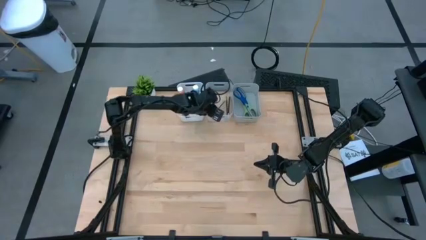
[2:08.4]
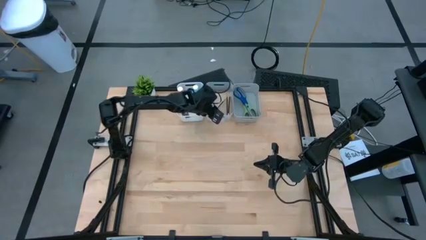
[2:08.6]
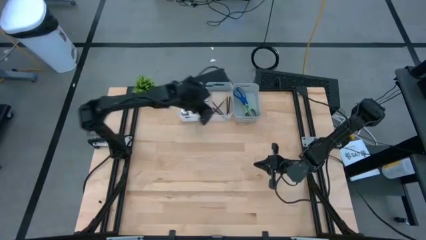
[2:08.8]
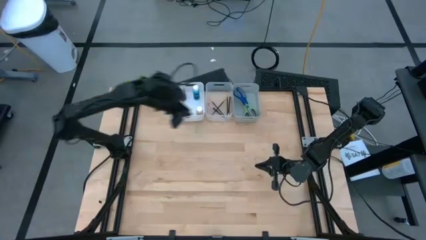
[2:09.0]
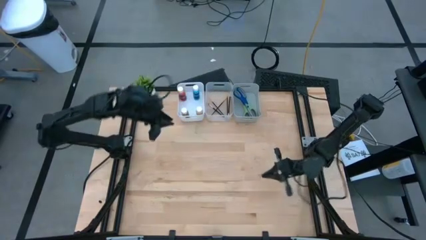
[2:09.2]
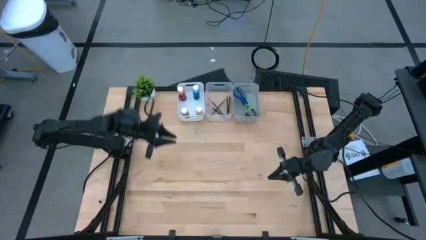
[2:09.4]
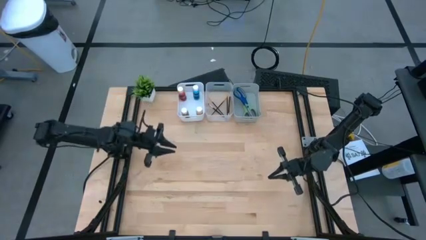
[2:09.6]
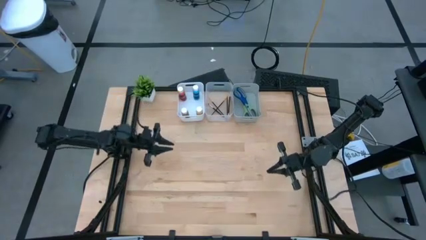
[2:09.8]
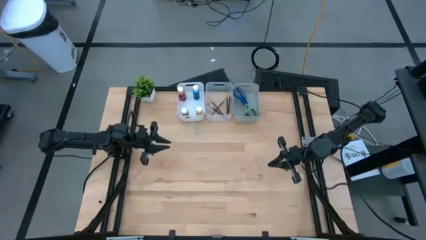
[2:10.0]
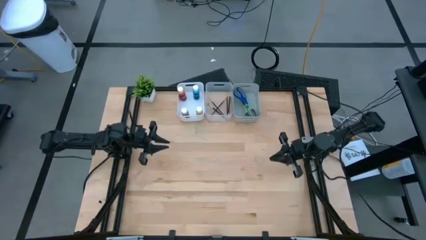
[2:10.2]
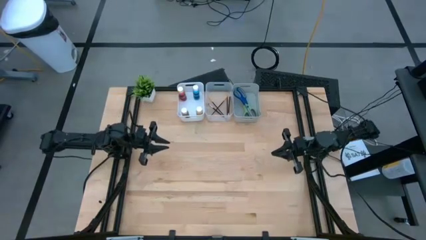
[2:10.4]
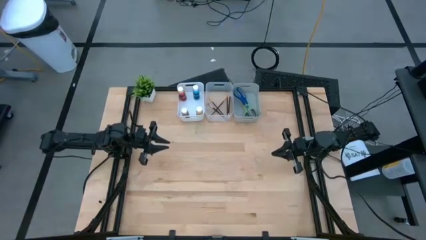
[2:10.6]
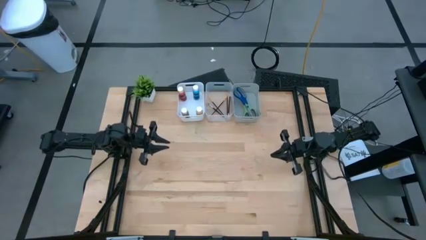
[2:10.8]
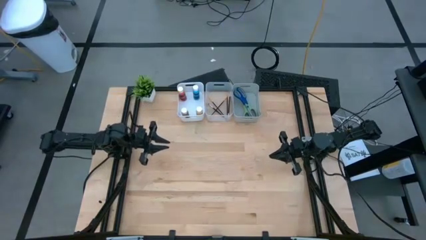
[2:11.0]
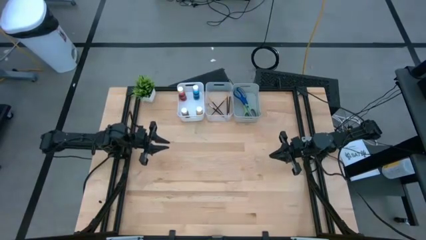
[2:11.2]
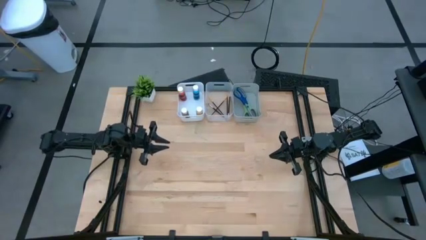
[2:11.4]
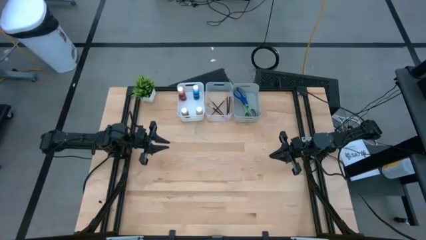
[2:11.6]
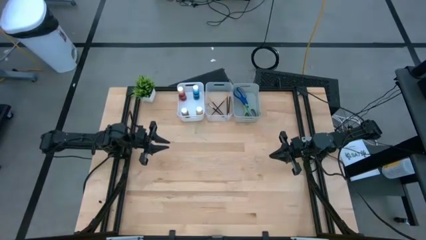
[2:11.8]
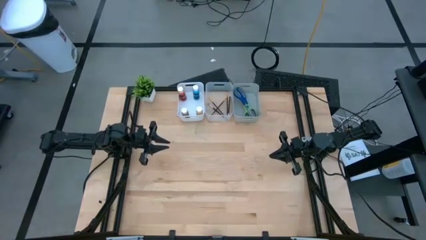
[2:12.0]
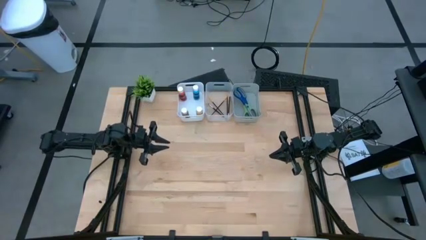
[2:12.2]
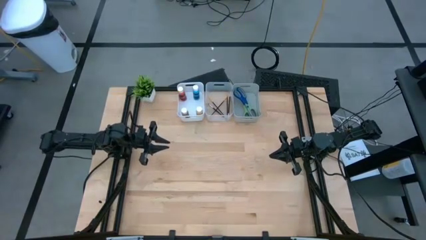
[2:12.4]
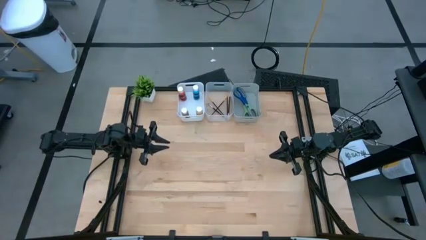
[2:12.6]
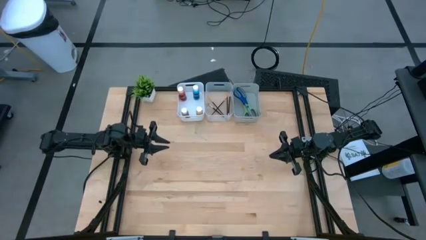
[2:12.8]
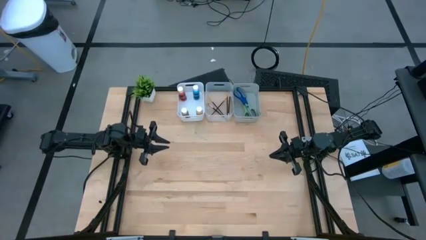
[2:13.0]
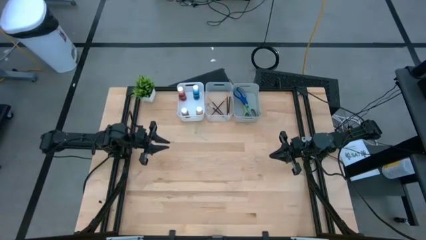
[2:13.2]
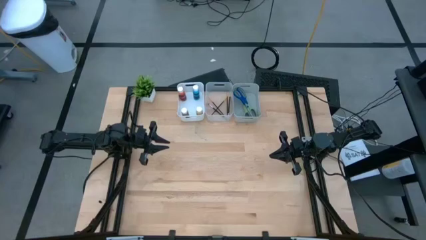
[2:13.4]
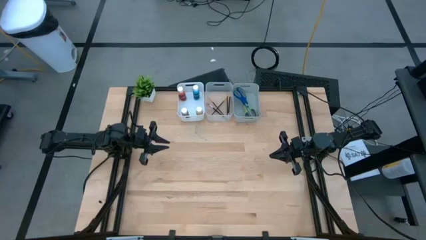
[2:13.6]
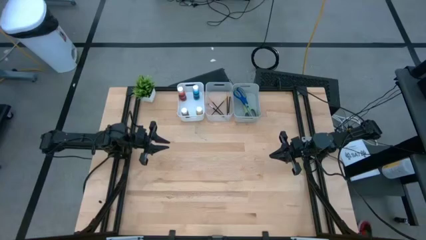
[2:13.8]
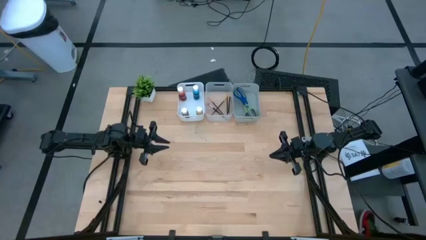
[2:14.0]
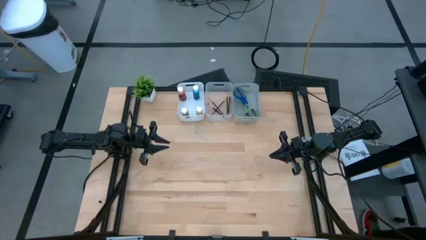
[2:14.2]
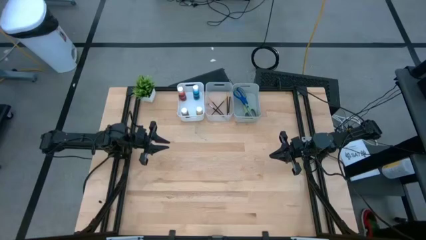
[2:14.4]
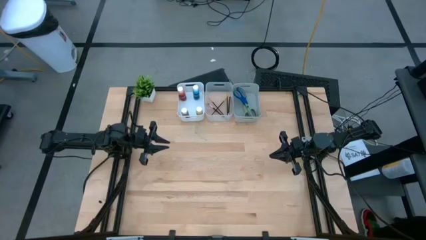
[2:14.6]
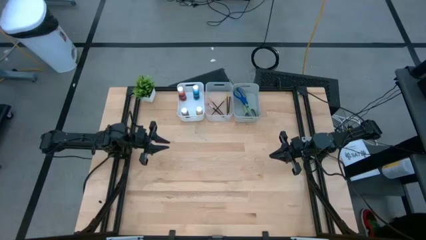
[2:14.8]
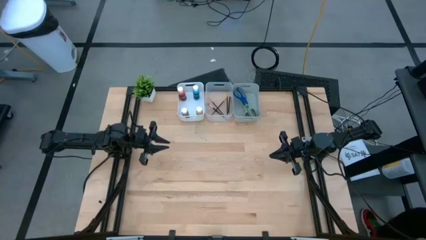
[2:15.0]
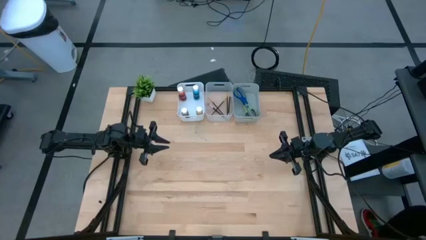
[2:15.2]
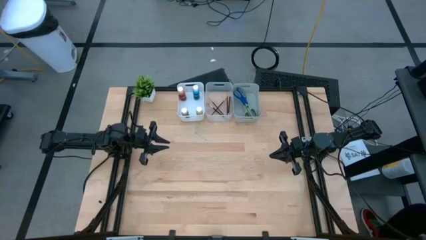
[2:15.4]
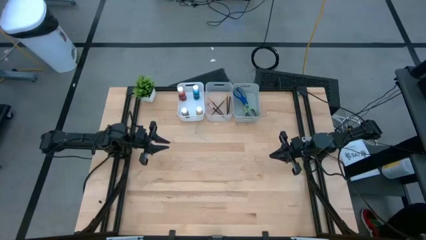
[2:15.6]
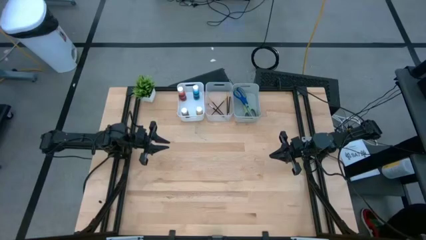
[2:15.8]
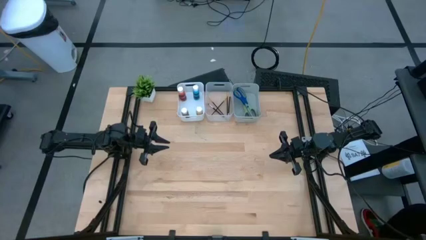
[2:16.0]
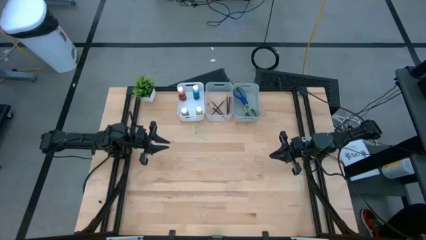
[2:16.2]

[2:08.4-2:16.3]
Task: Pick & Place Paint Supplies
Return to Home Position

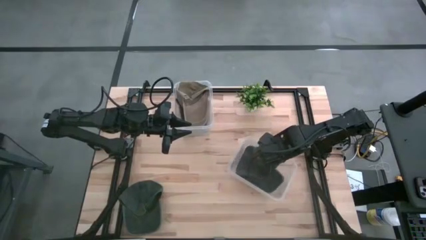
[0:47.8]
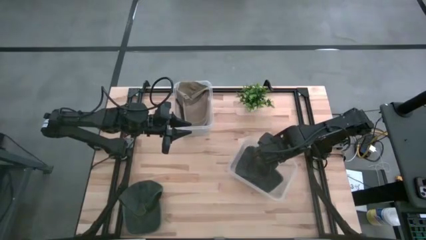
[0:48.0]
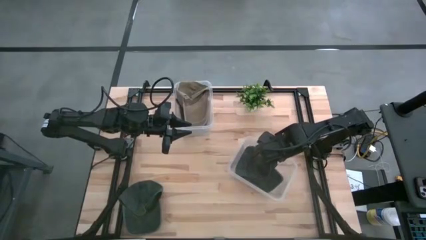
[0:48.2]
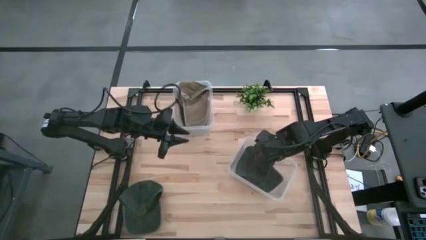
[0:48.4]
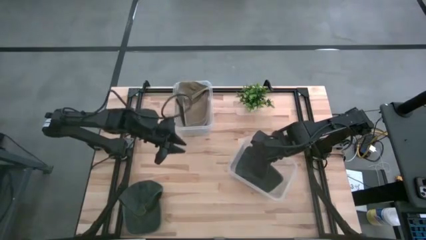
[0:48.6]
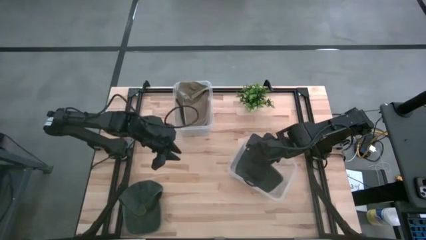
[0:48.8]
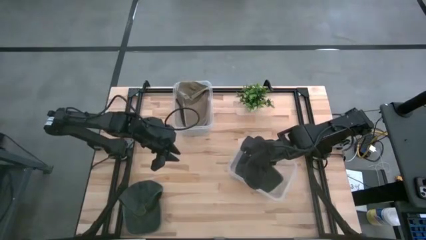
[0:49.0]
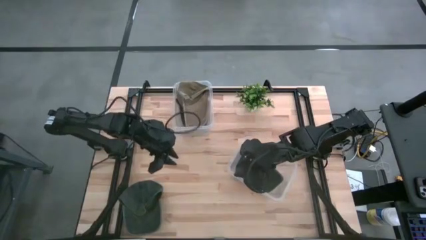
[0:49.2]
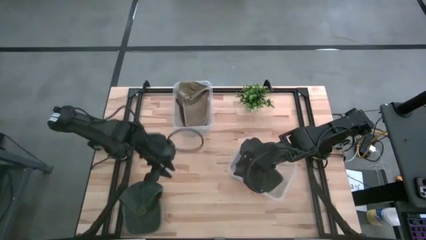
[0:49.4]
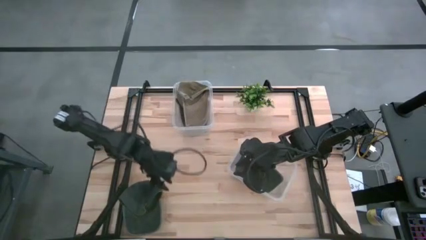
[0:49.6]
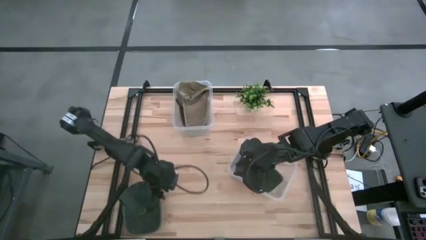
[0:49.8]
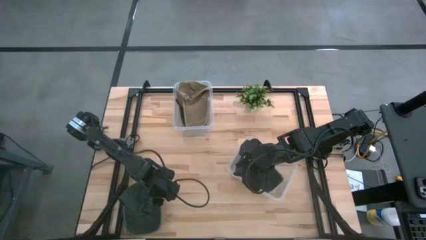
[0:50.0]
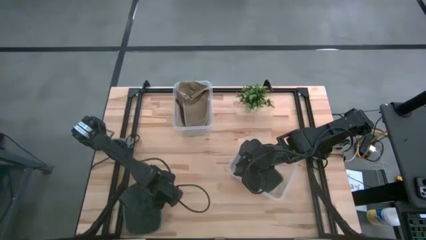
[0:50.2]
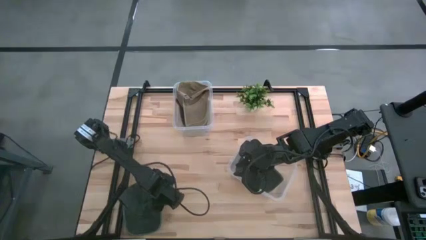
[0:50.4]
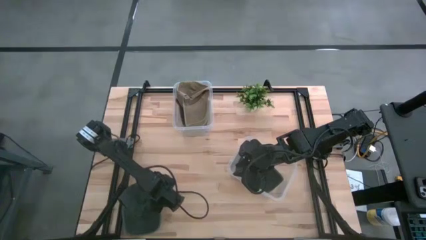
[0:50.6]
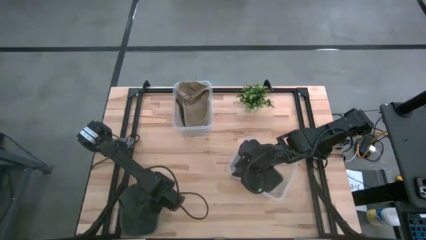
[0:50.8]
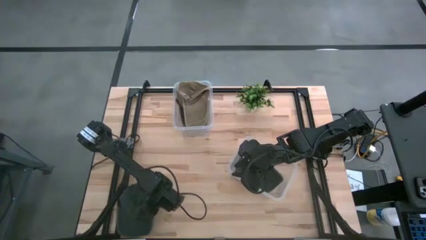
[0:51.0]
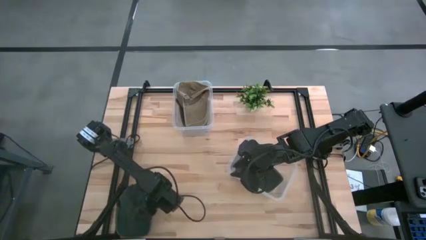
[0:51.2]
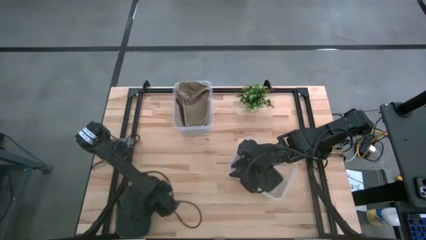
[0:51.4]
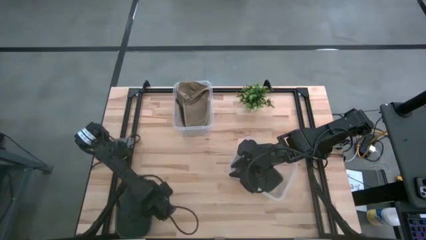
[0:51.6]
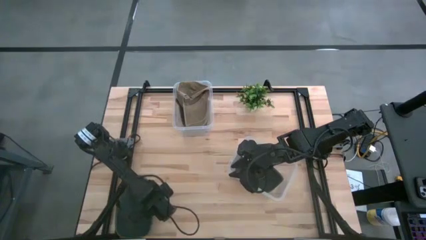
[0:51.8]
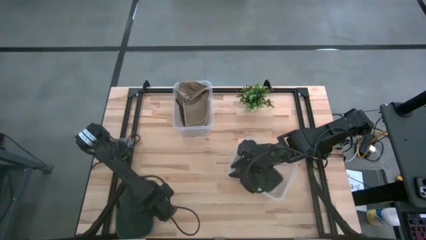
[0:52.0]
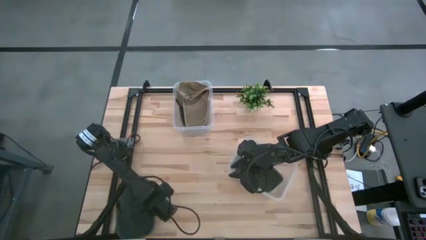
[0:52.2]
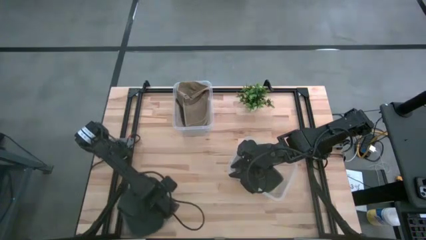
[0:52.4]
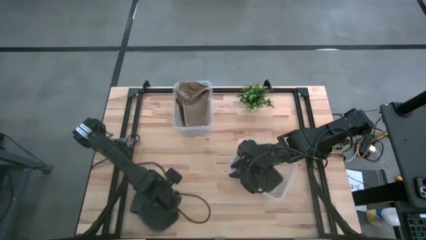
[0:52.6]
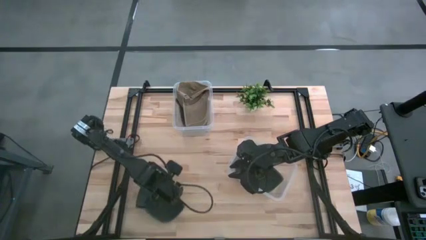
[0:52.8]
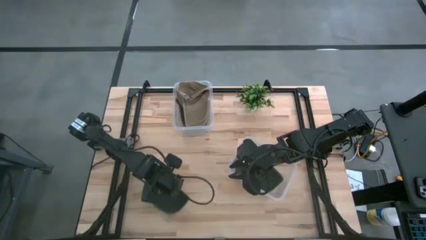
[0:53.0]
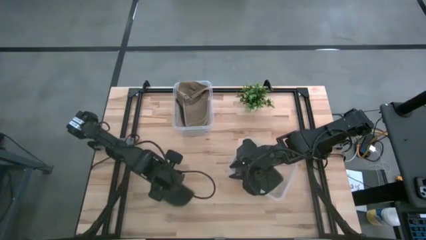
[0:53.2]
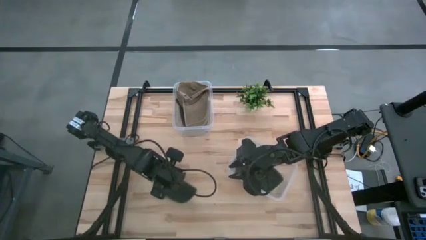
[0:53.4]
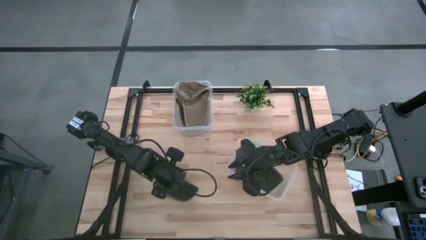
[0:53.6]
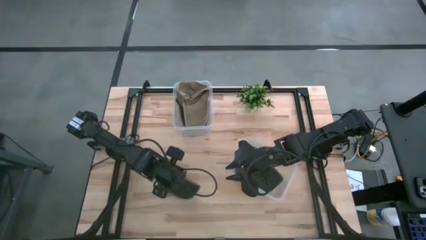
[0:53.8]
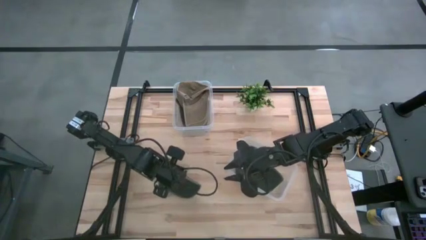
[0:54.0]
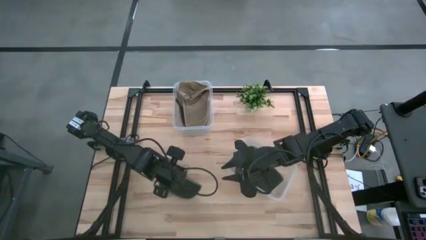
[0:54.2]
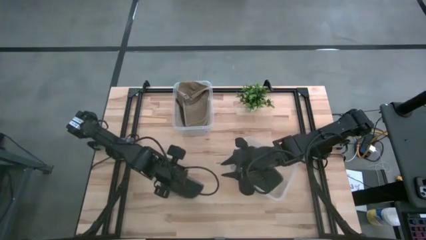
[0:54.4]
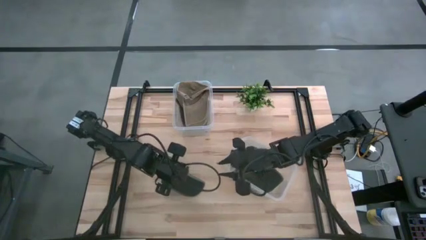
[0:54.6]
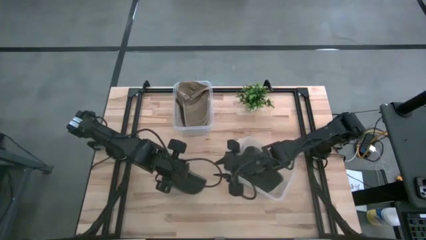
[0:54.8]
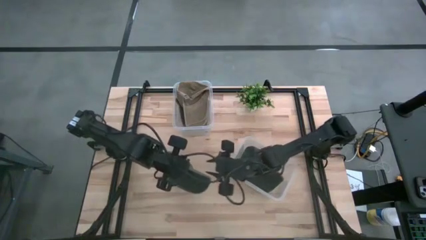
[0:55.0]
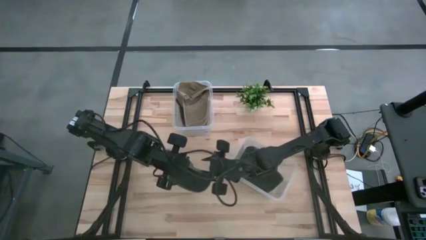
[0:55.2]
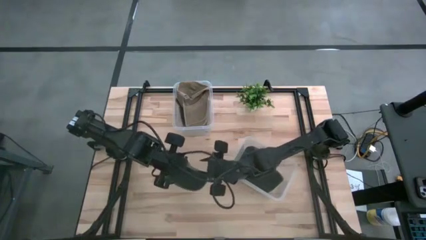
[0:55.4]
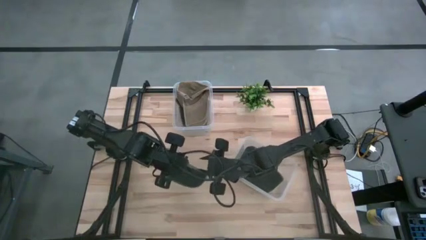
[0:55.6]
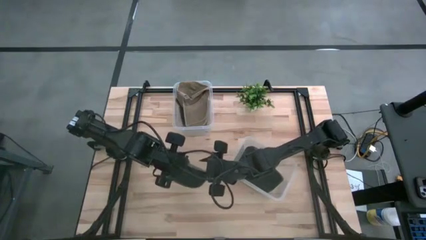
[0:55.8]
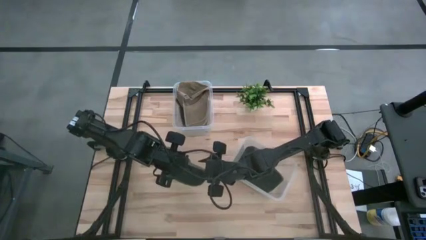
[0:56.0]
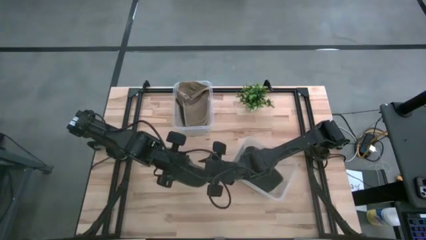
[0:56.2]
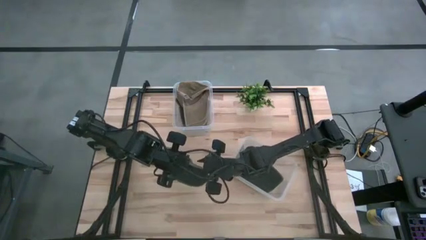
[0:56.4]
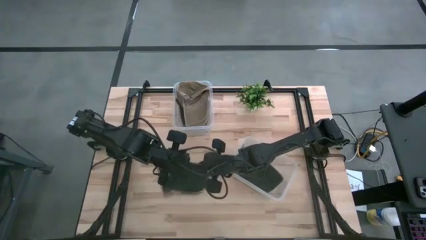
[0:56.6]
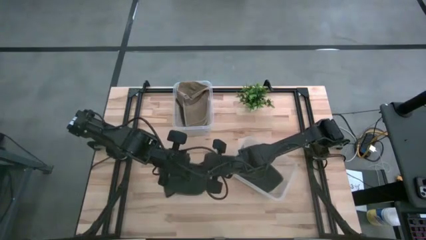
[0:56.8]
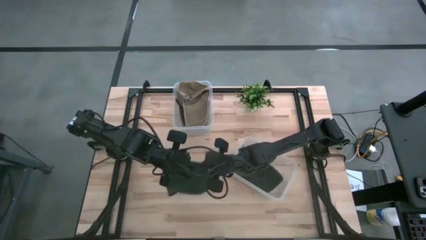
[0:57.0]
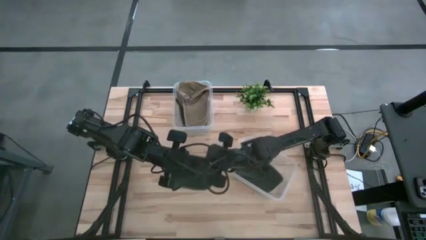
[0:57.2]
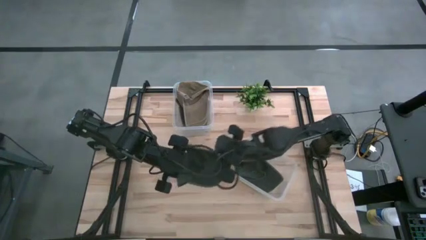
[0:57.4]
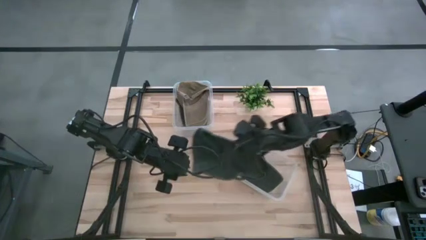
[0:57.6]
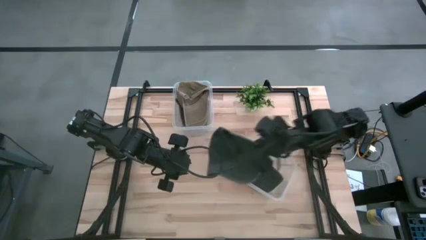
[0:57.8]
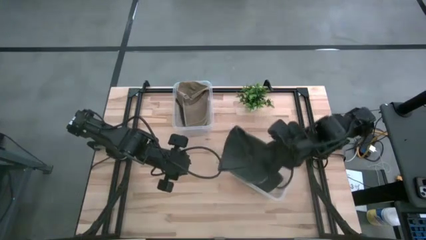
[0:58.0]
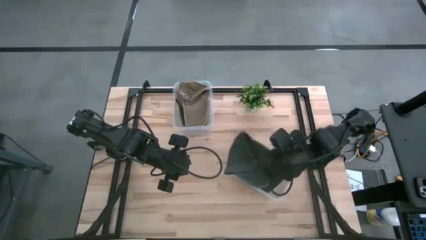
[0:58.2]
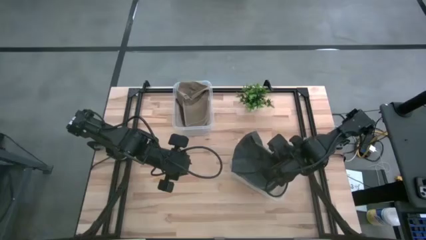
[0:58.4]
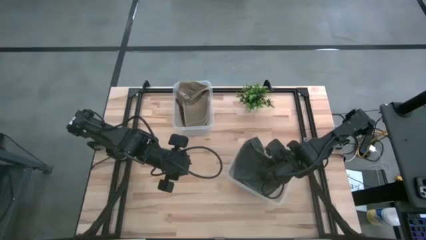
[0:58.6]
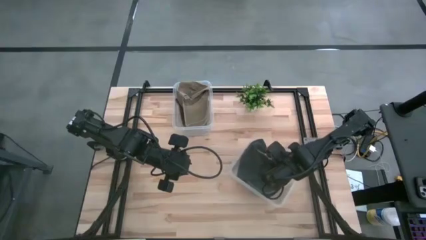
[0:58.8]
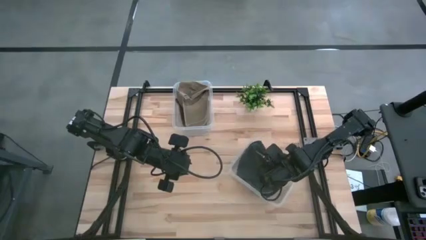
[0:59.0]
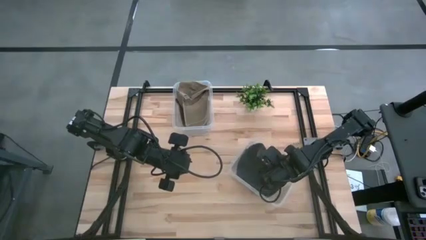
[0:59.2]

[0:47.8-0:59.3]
Task: Pick & Place hat
Put the black cap into the bottom transparent bin
